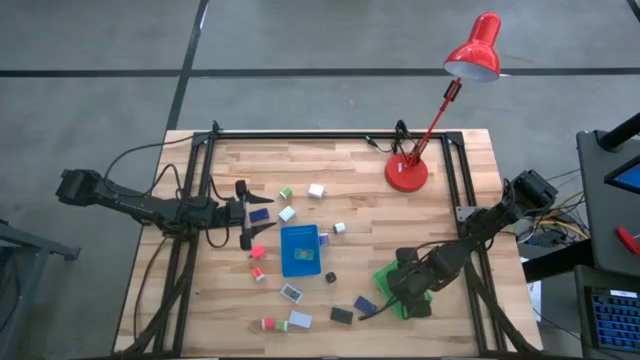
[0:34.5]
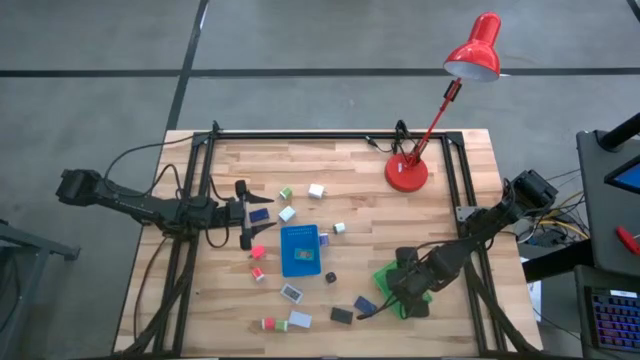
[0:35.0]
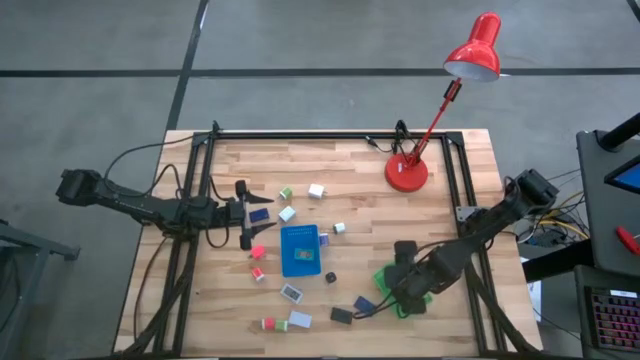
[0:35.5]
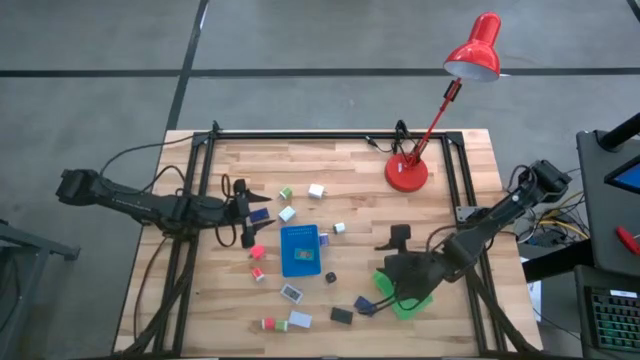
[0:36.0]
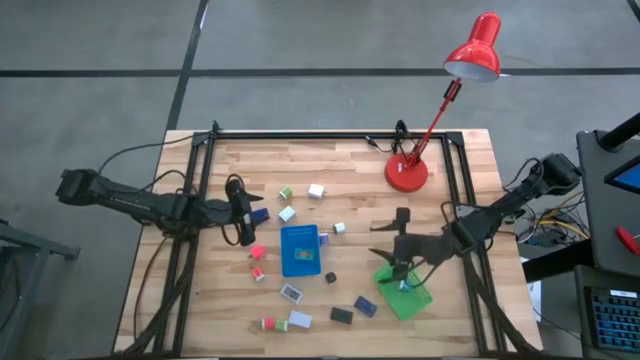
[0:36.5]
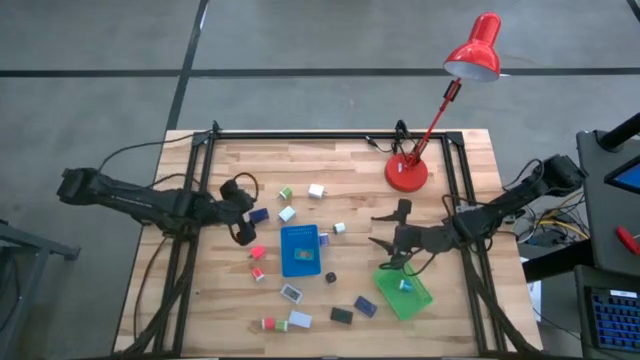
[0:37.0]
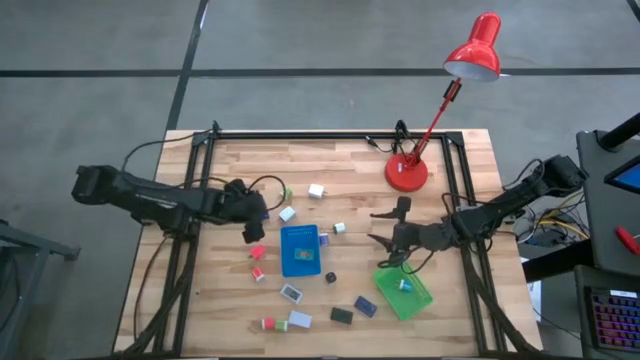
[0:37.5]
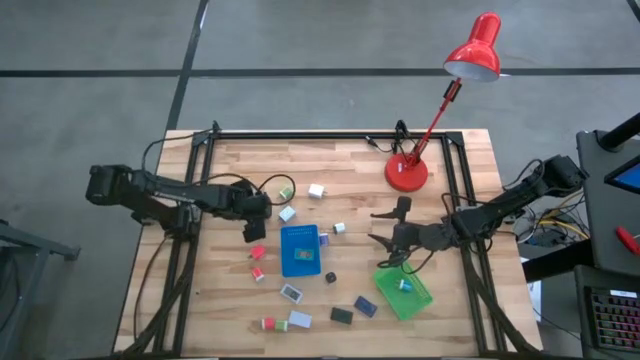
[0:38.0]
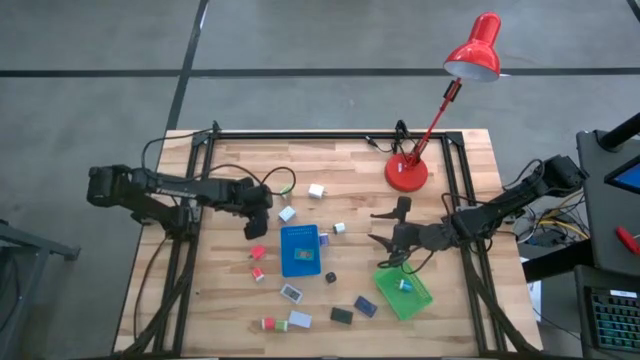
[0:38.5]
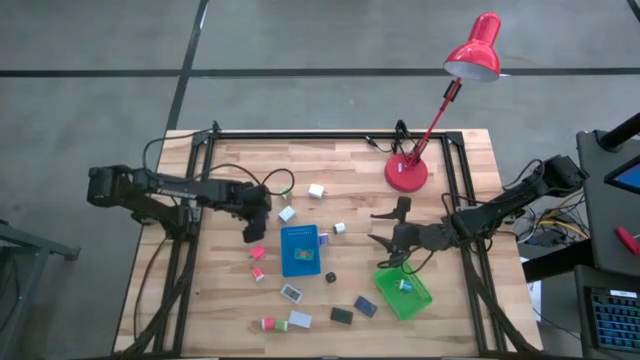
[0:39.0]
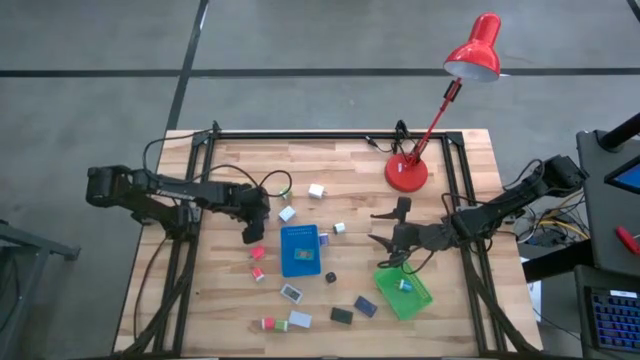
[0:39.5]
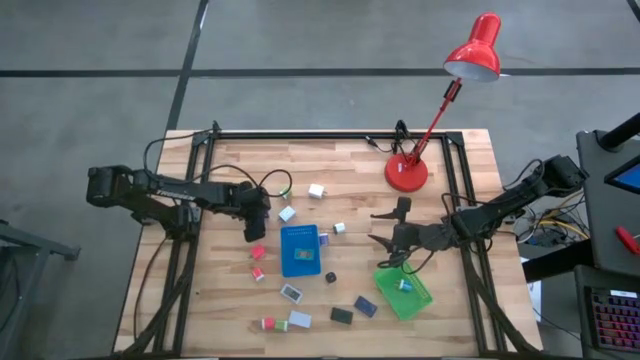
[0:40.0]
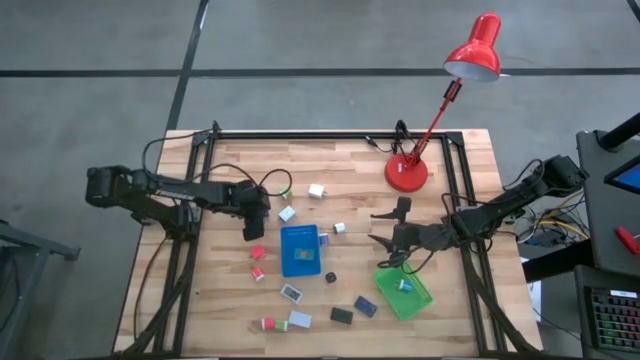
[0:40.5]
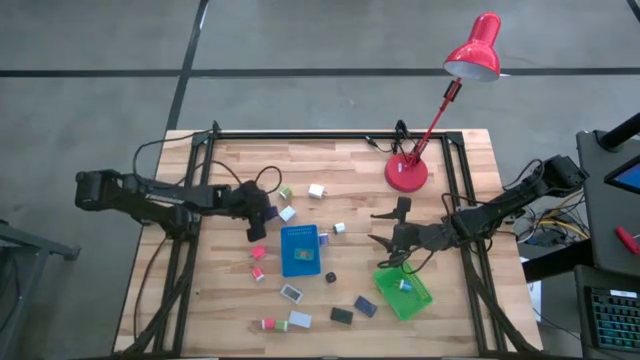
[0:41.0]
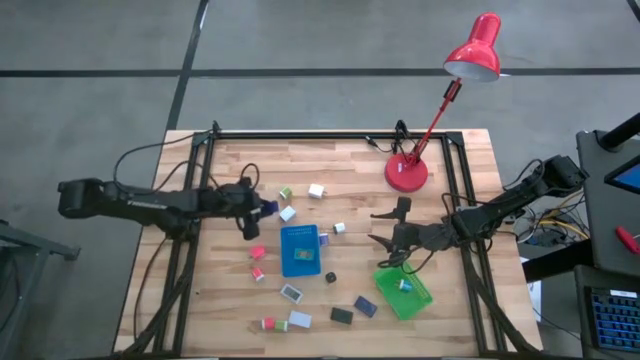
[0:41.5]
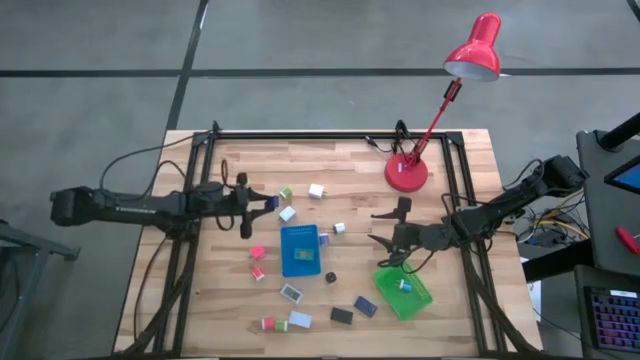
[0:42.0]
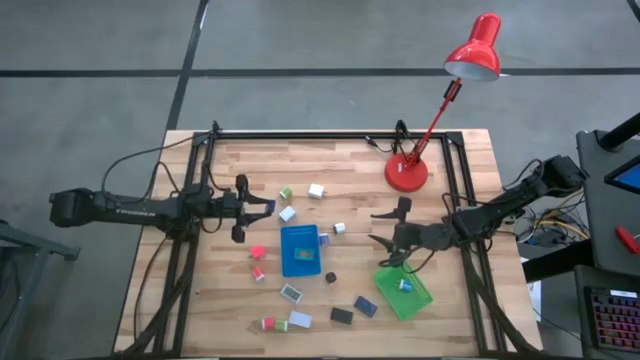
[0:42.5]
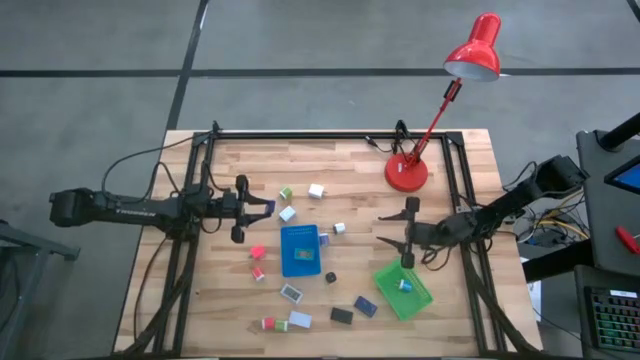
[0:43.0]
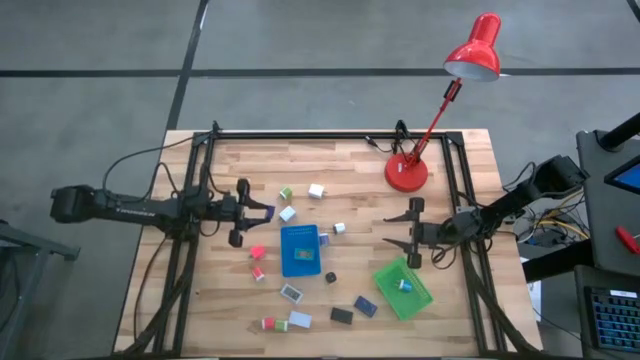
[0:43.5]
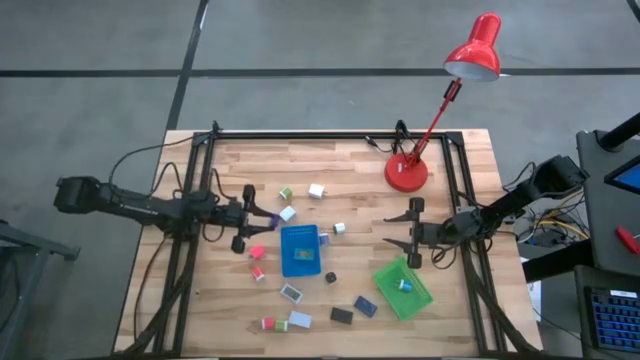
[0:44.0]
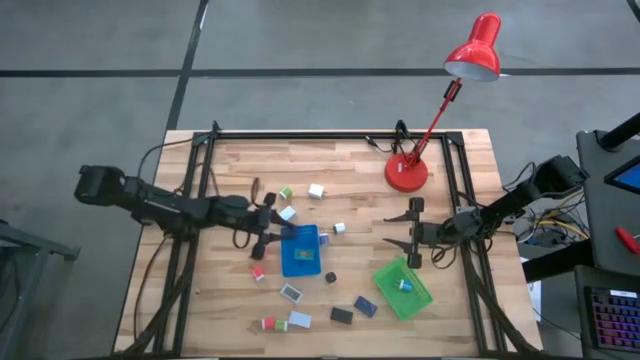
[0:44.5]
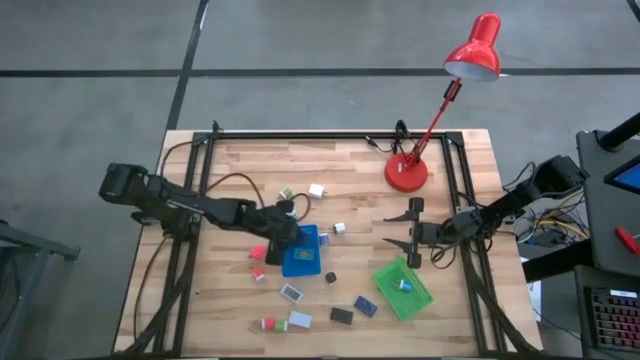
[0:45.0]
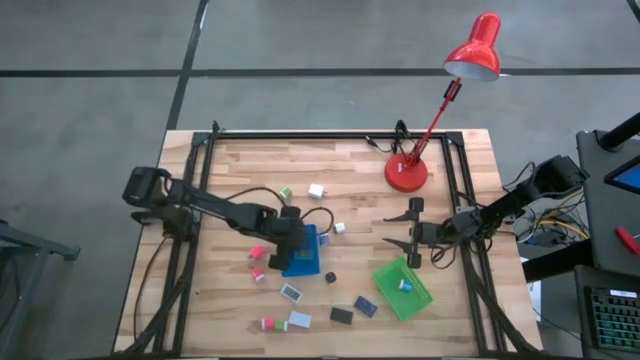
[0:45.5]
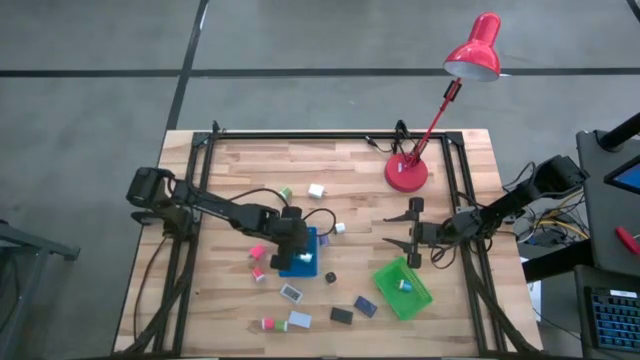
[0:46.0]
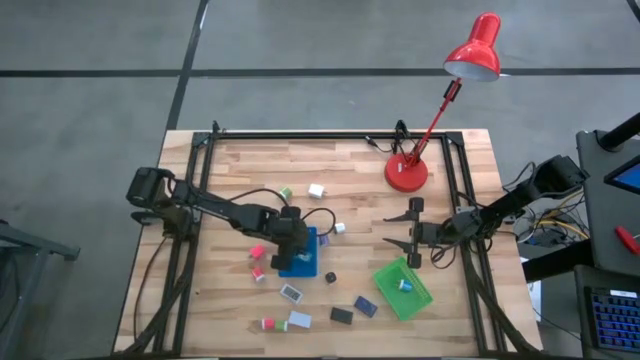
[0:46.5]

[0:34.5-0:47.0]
Task: Pick & Place Office items
Put the top violet digital clock into the blue bin
